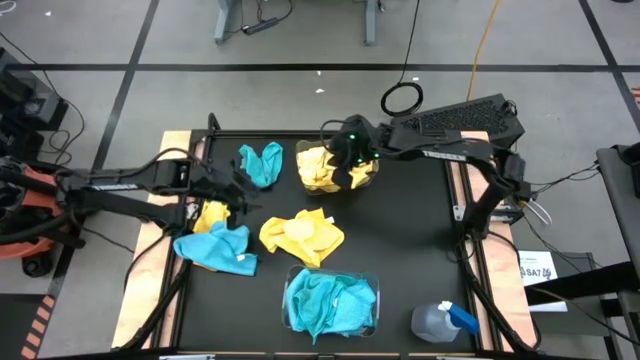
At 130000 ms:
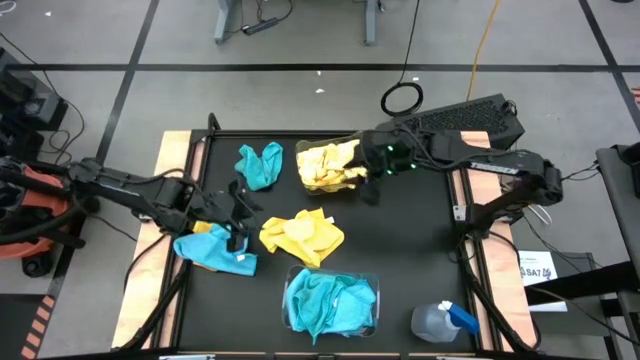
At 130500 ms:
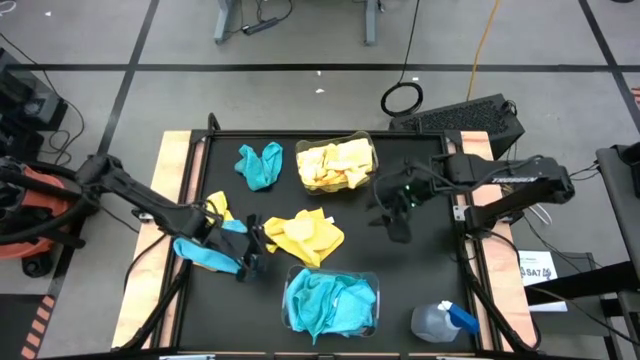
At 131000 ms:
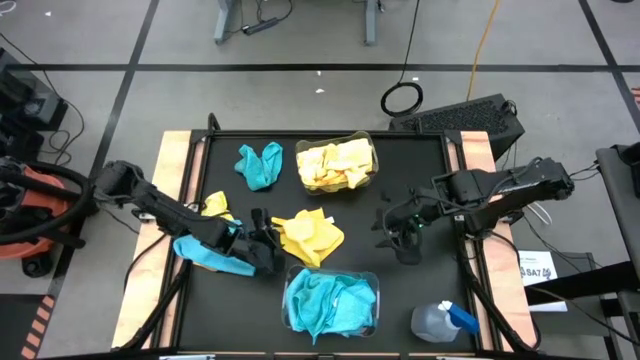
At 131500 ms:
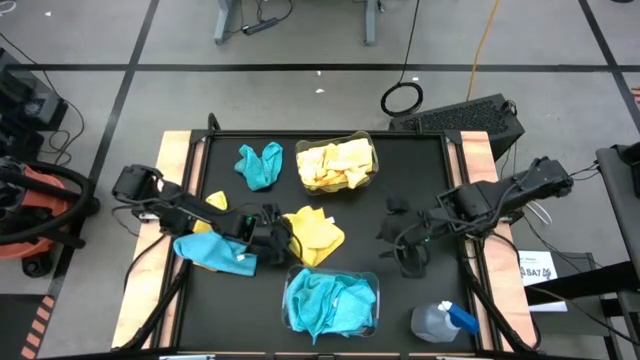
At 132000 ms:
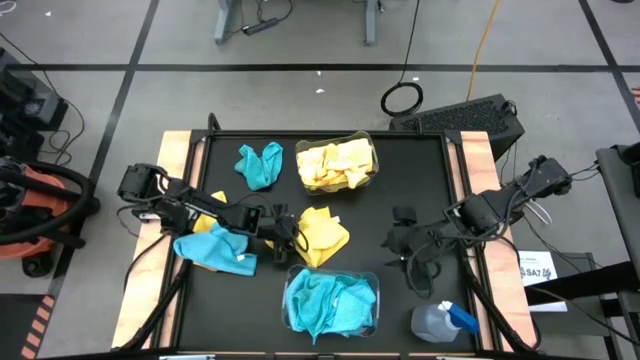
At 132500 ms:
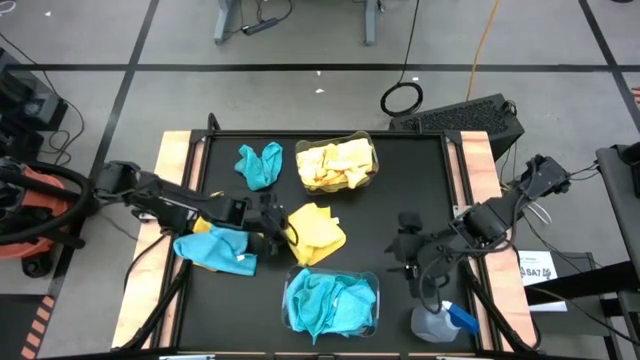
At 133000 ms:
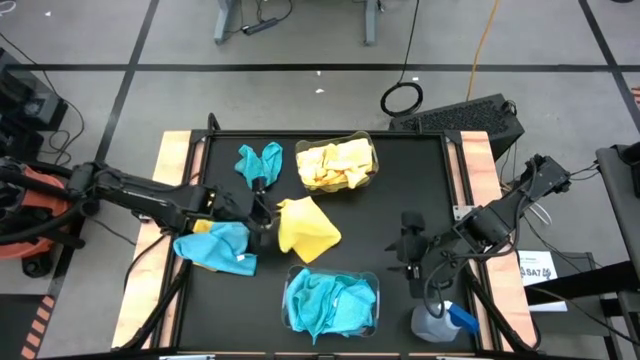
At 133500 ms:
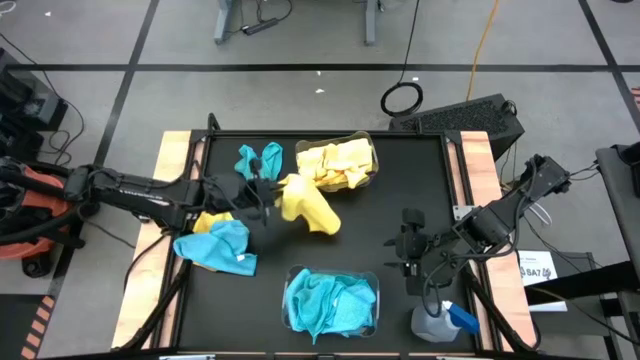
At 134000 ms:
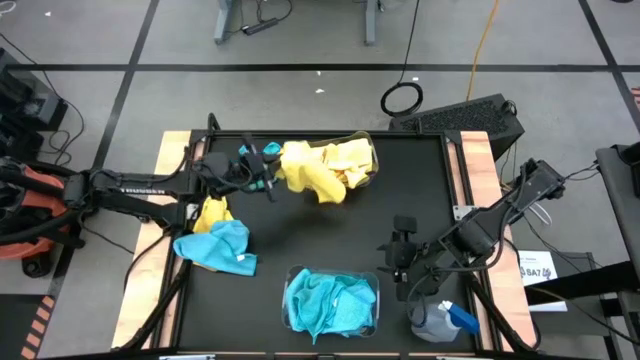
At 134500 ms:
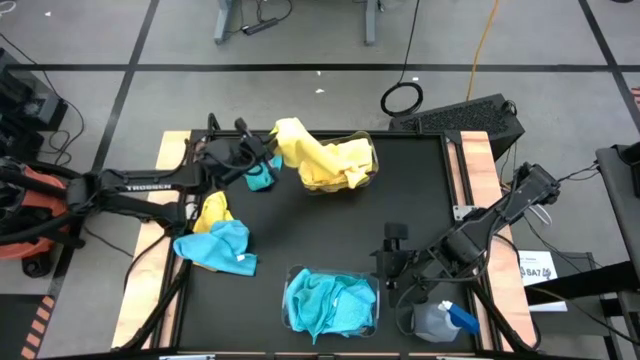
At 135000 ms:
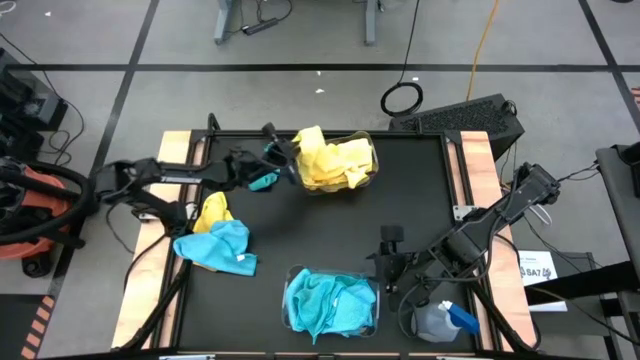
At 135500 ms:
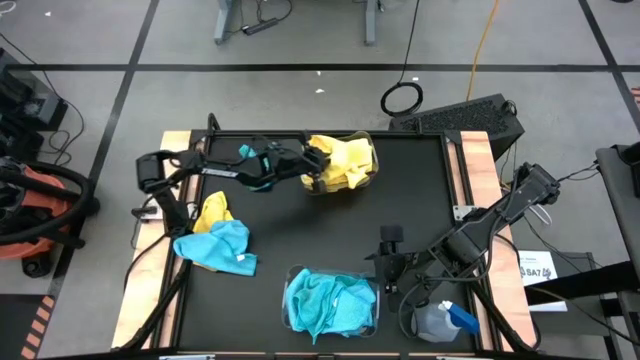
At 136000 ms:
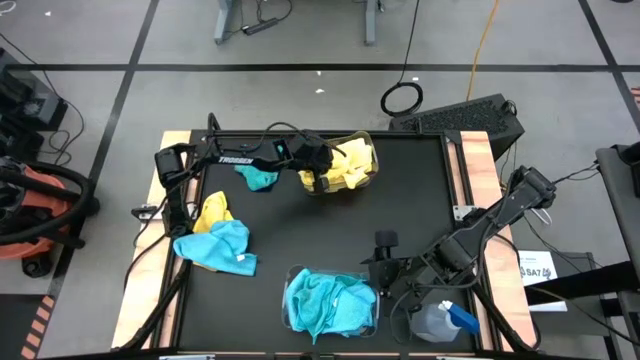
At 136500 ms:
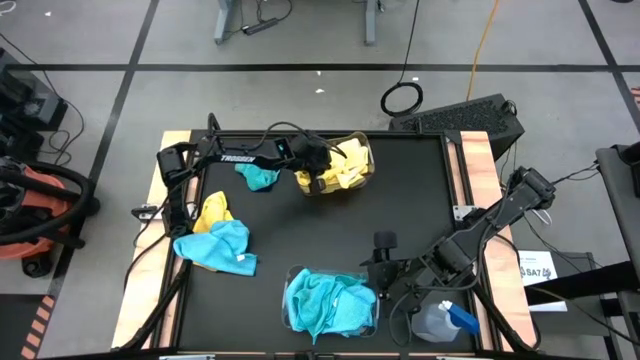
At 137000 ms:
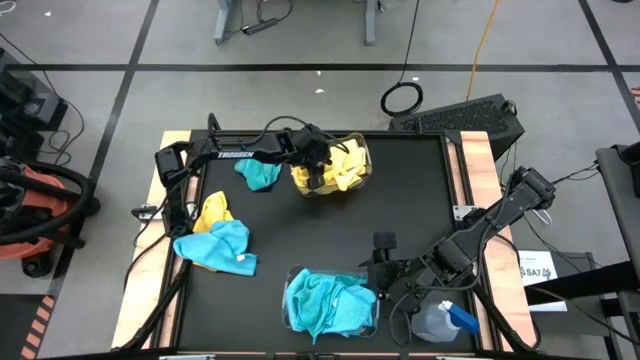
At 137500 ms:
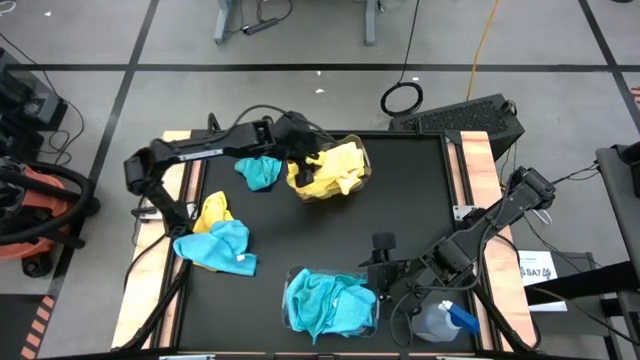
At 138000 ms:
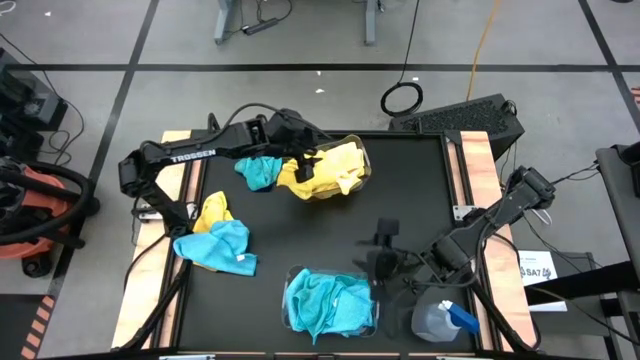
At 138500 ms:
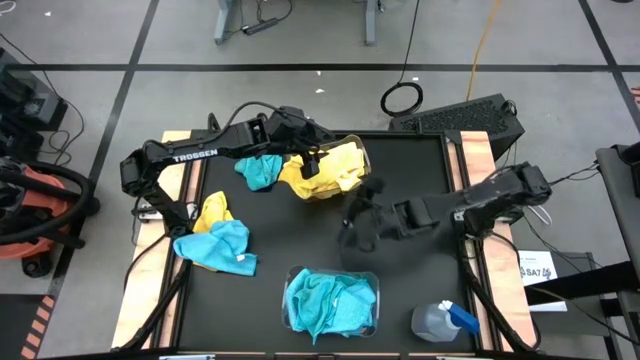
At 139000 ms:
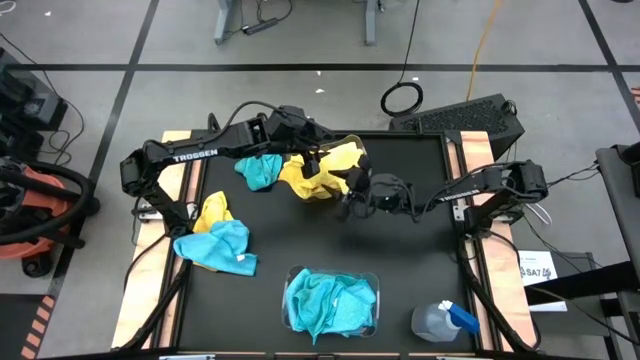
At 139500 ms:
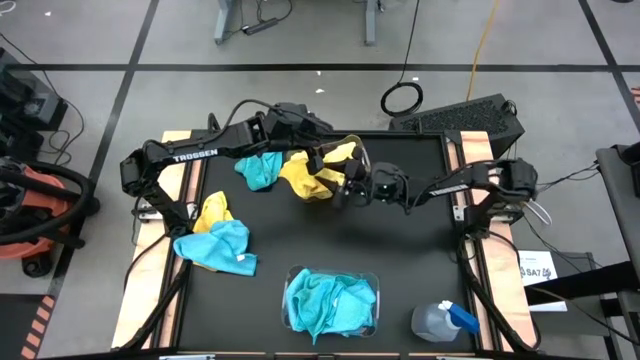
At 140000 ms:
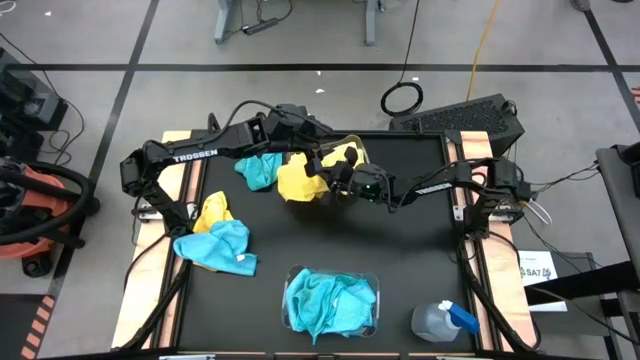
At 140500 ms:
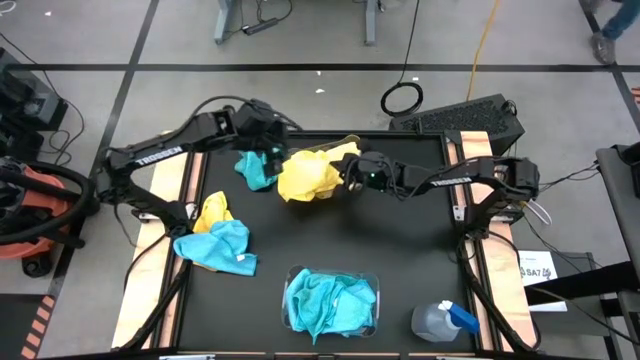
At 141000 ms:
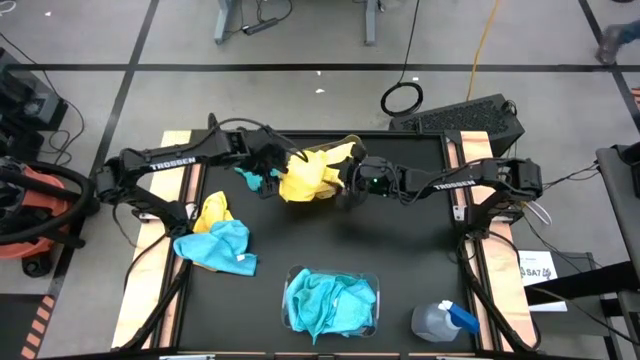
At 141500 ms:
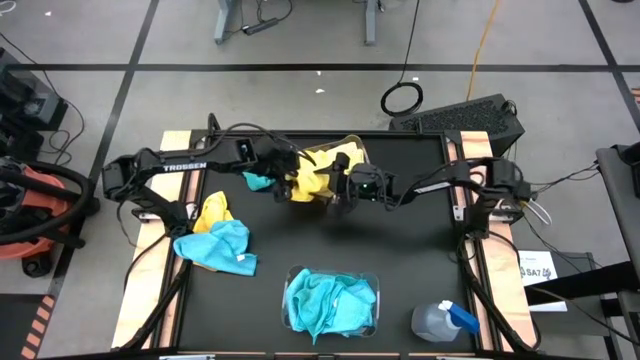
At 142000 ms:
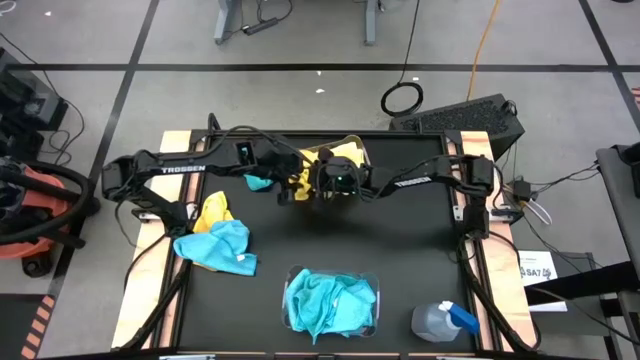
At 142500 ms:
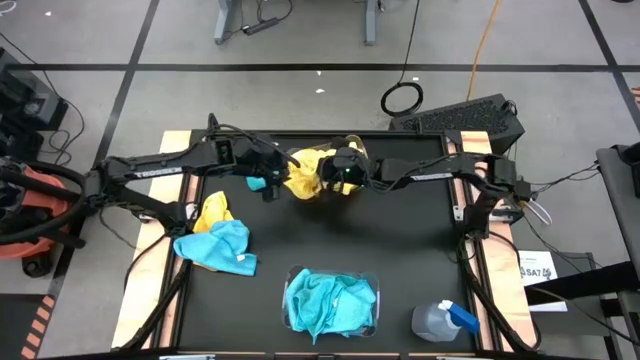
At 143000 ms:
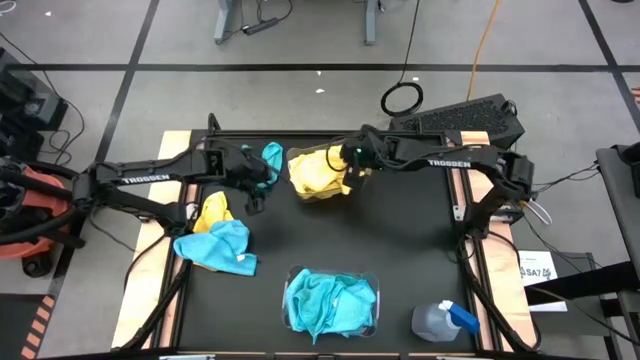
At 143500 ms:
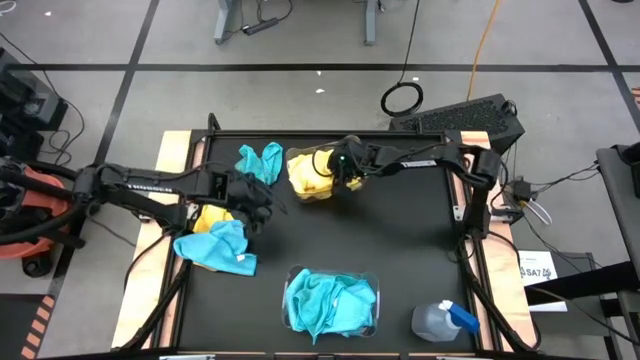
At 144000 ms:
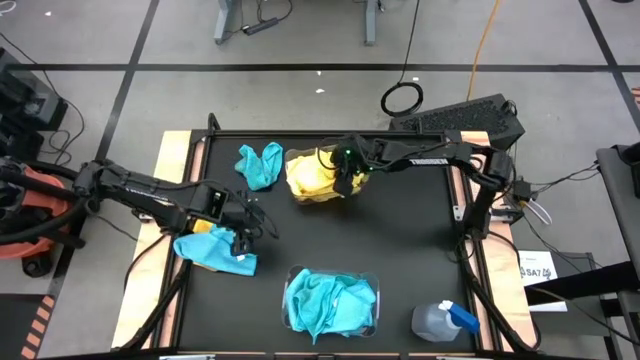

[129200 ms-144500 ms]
Task: Sort microfiber towel by color & place in baskets
Put the yellow towel into the top transparent bin

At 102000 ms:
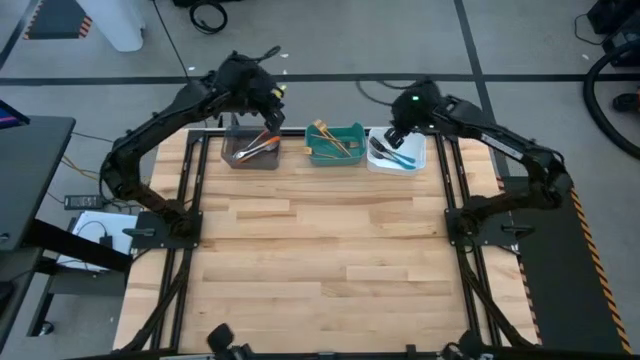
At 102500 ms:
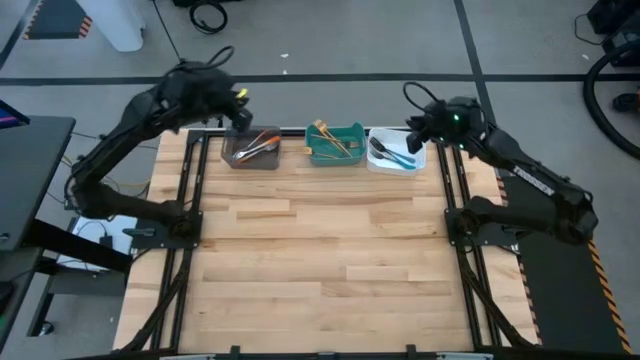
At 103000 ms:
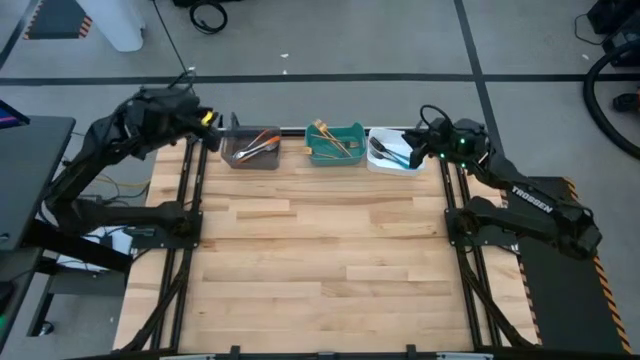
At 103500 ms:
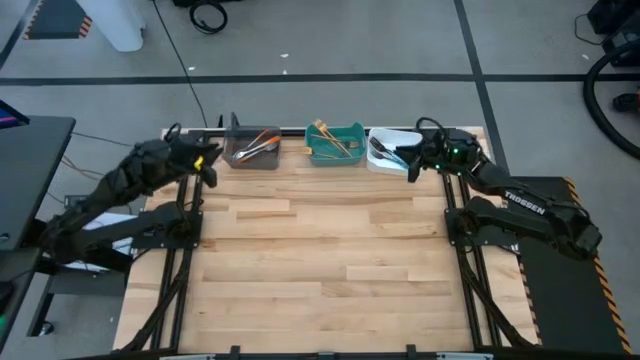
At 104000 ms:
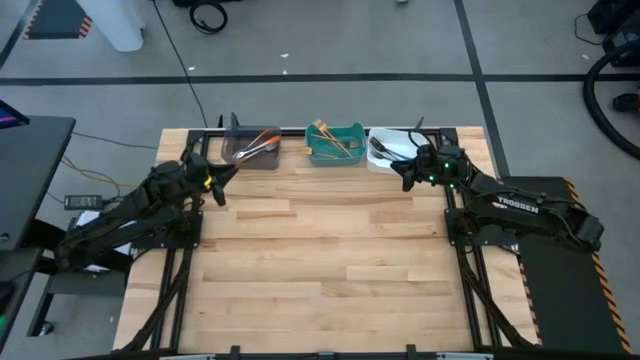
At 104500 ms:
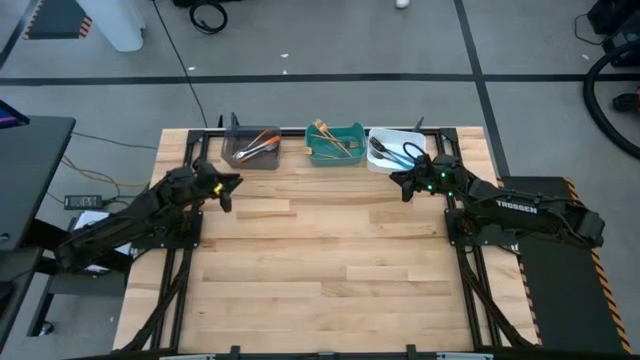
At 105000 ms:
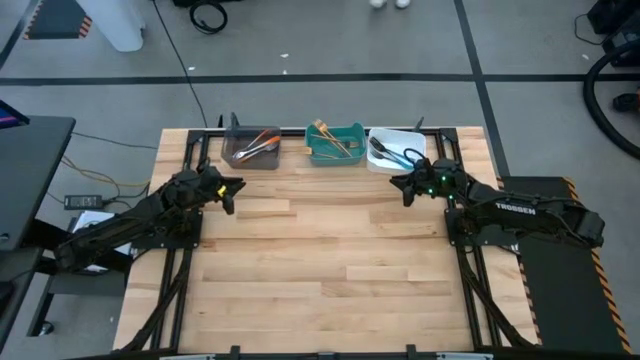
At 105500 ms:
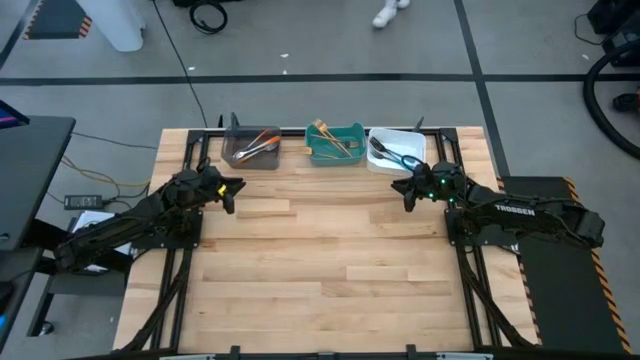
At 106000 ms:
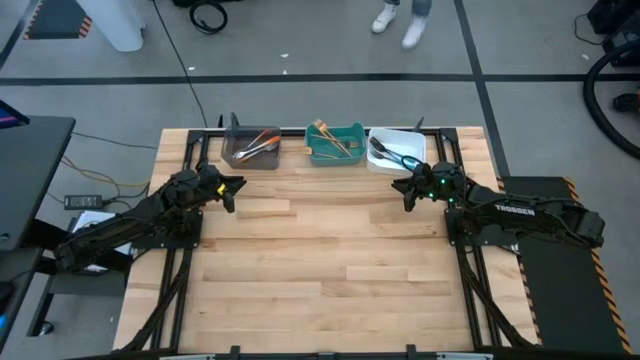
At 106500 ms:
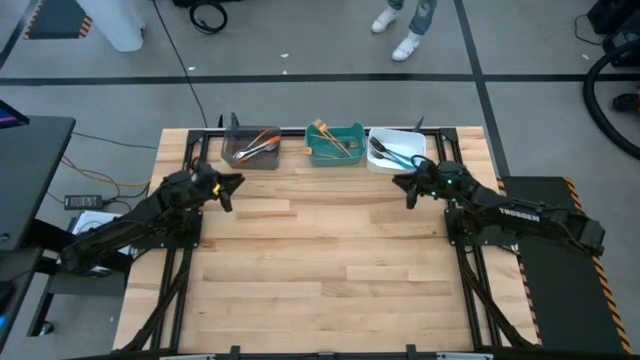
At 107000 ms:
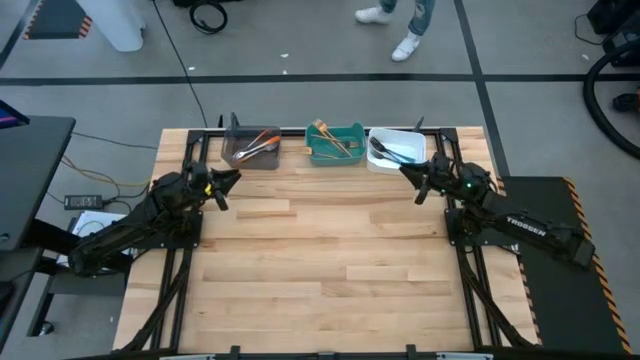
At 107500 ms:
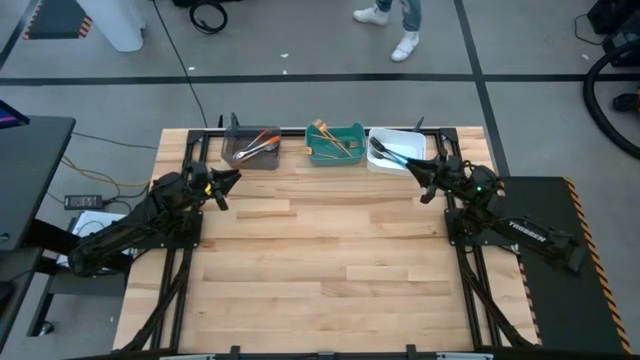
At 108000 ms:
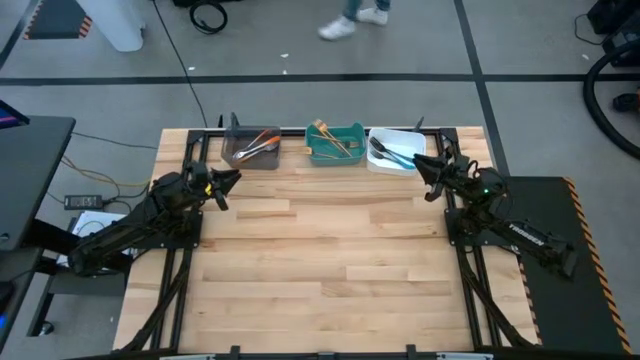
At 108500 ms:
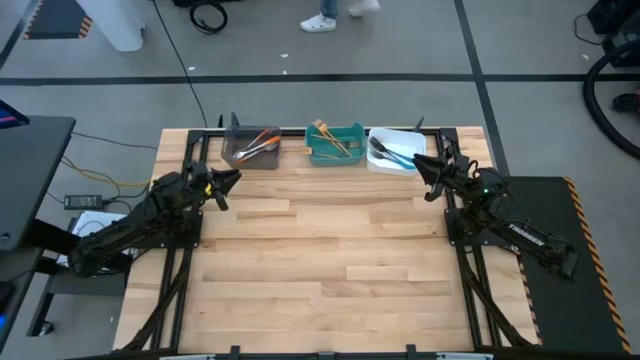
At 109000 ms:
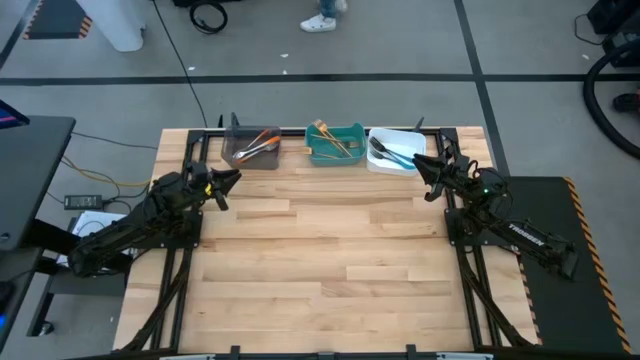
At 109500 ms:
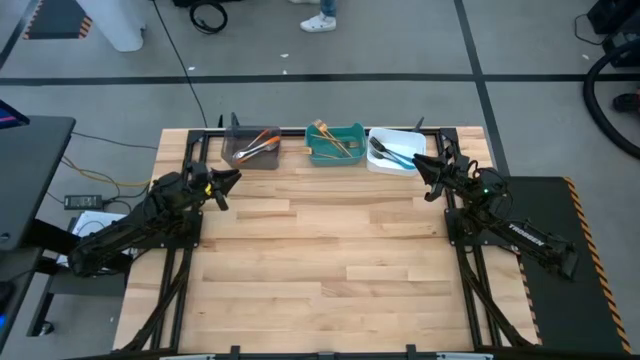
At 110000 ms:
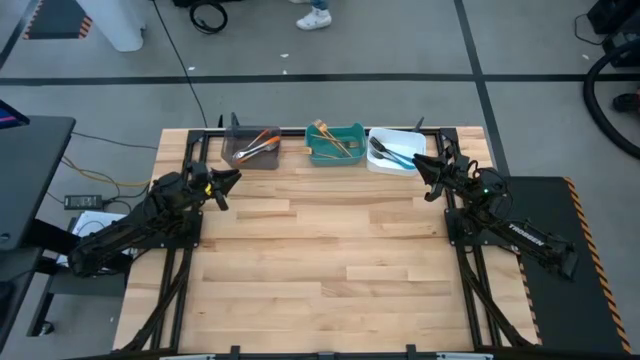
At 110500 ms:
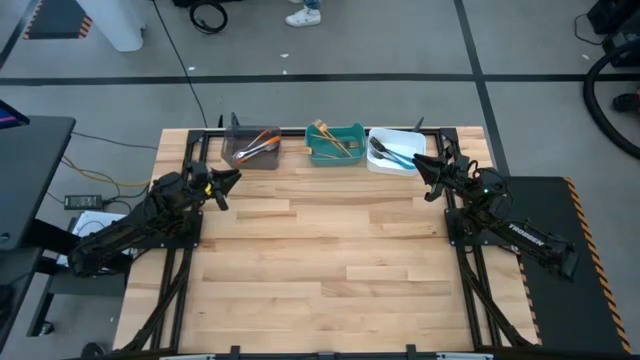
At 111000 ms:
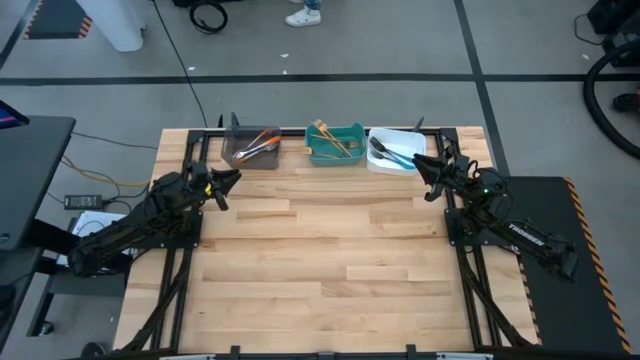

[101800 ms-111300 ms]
Task: Sort silverware by color (type)
Return to Home Position
